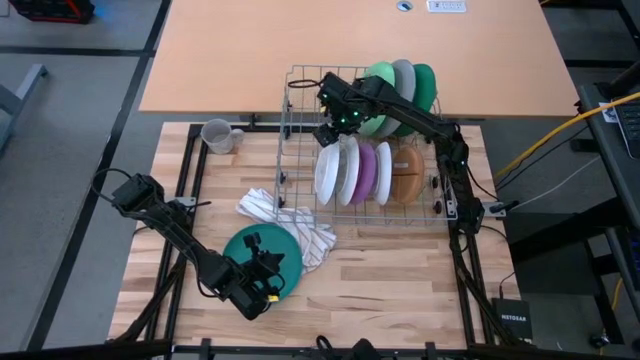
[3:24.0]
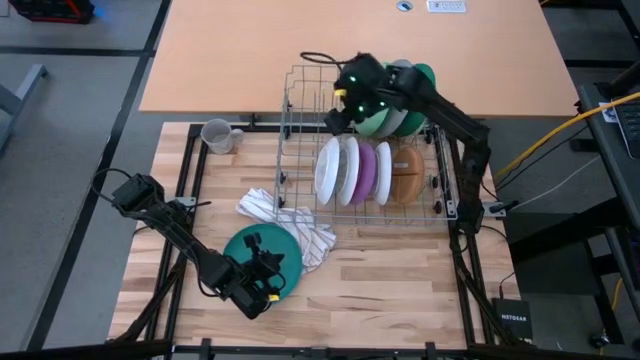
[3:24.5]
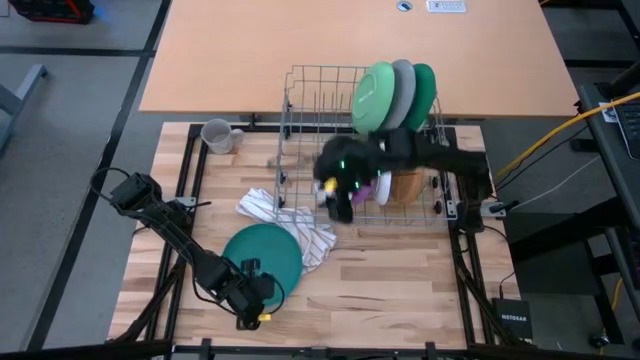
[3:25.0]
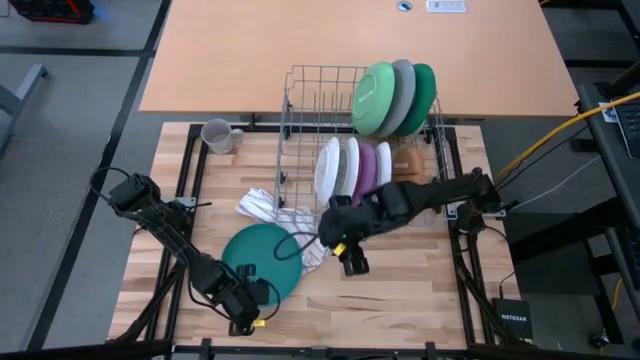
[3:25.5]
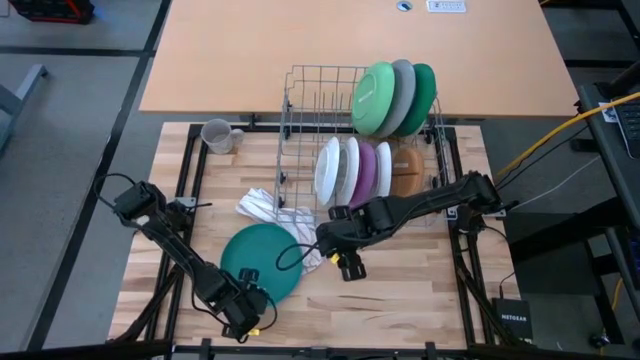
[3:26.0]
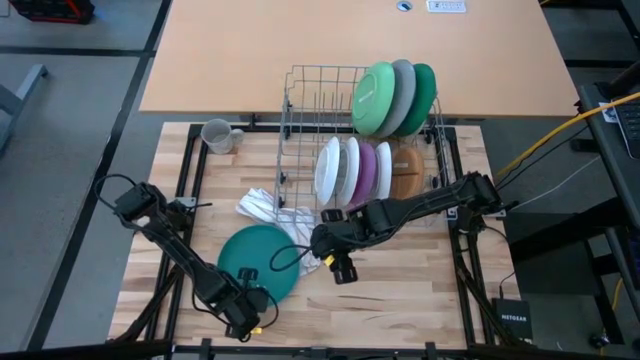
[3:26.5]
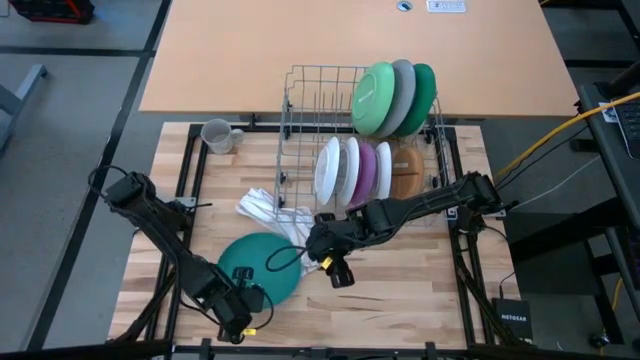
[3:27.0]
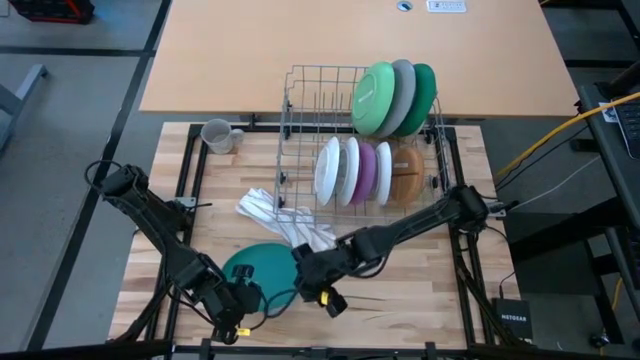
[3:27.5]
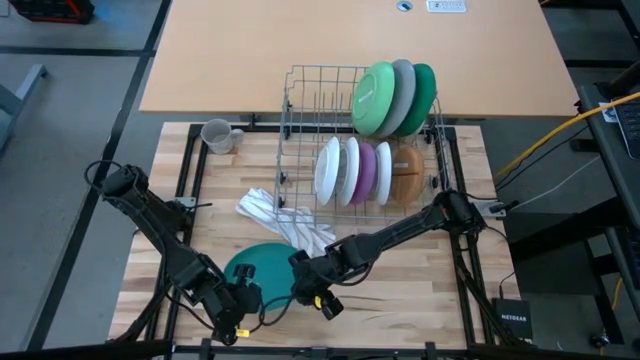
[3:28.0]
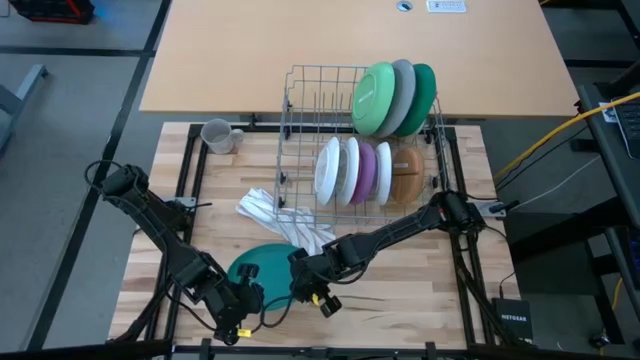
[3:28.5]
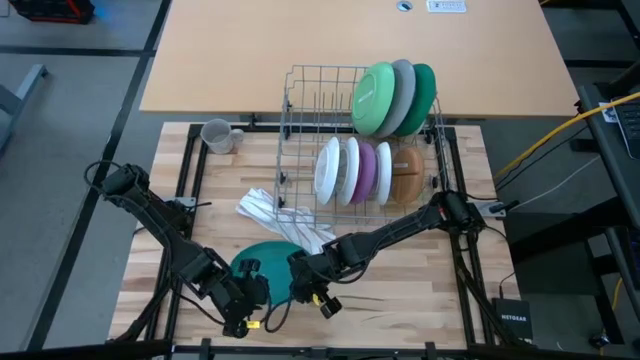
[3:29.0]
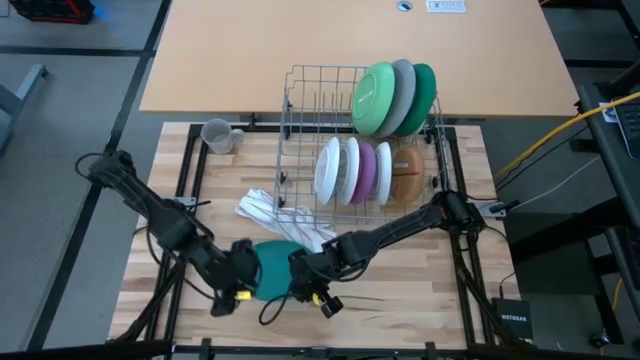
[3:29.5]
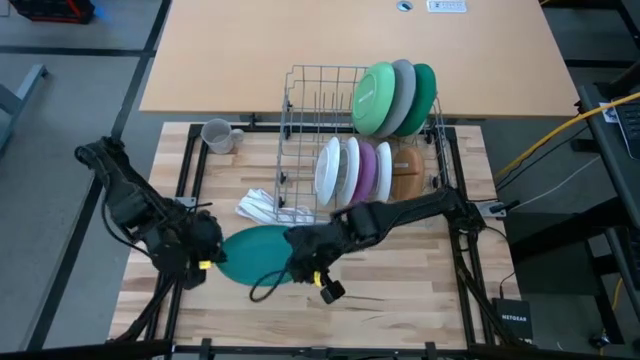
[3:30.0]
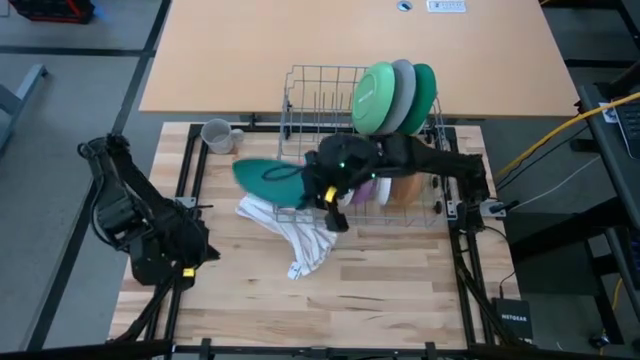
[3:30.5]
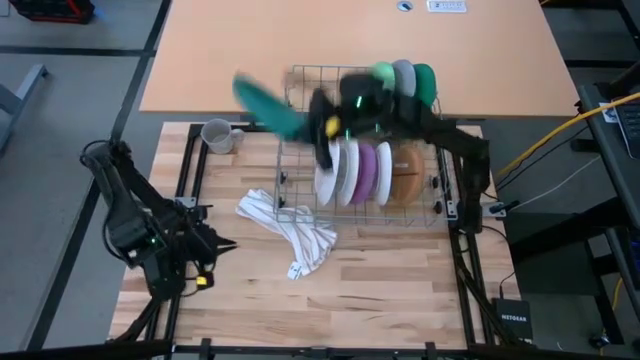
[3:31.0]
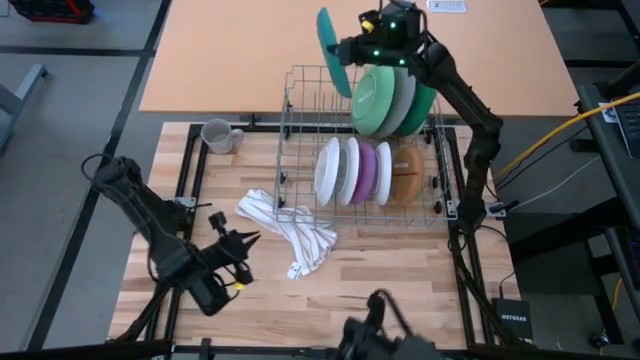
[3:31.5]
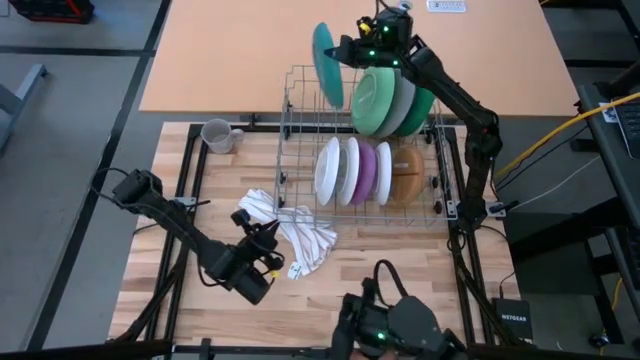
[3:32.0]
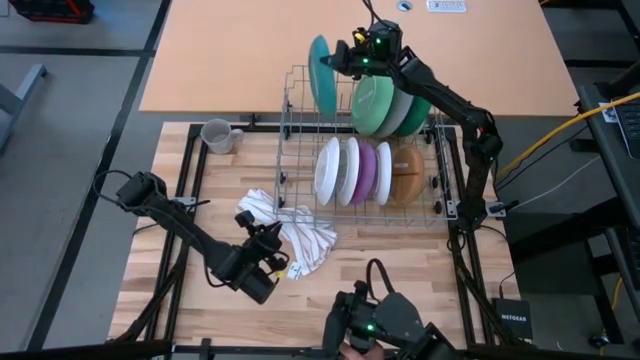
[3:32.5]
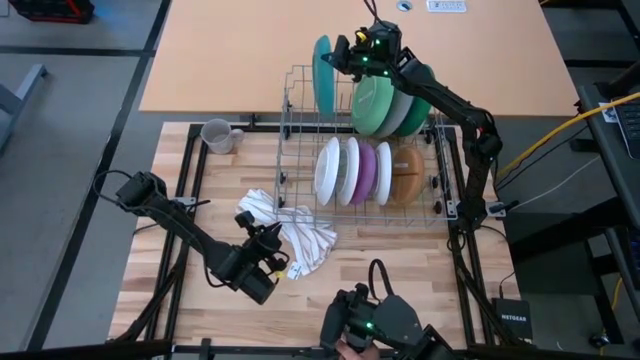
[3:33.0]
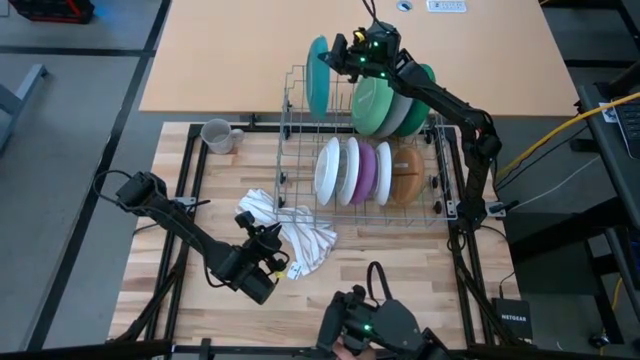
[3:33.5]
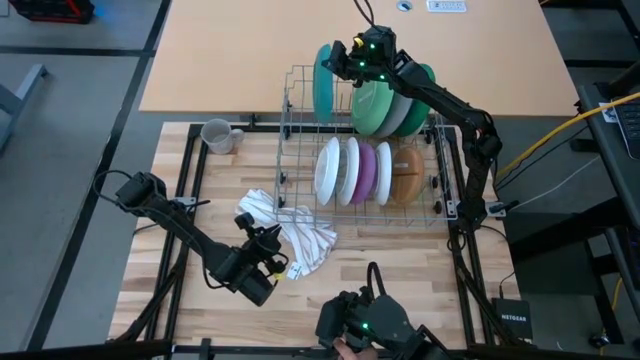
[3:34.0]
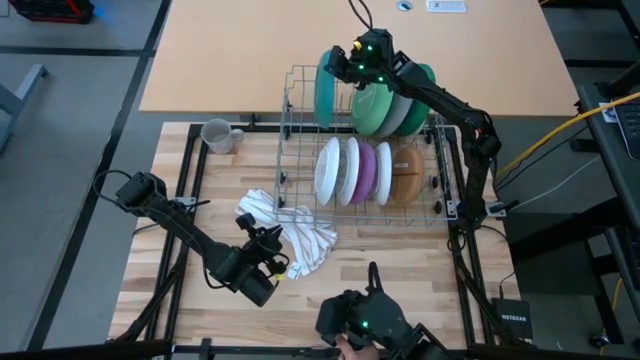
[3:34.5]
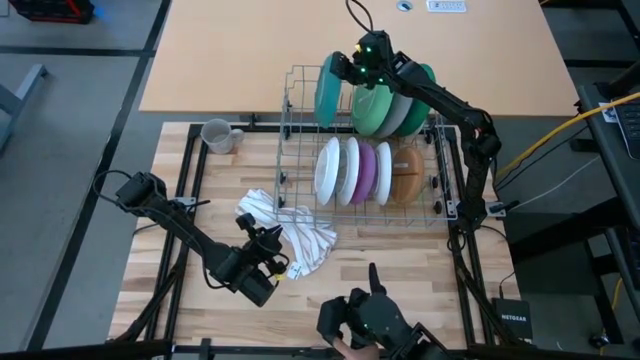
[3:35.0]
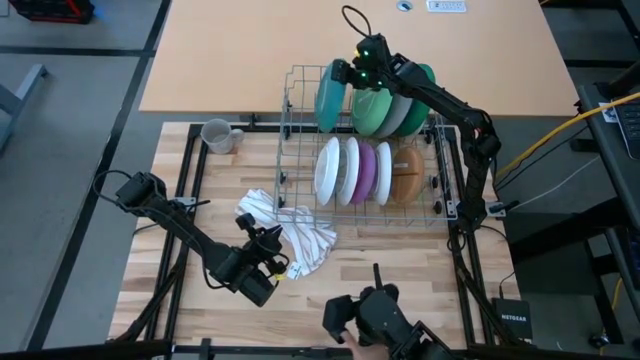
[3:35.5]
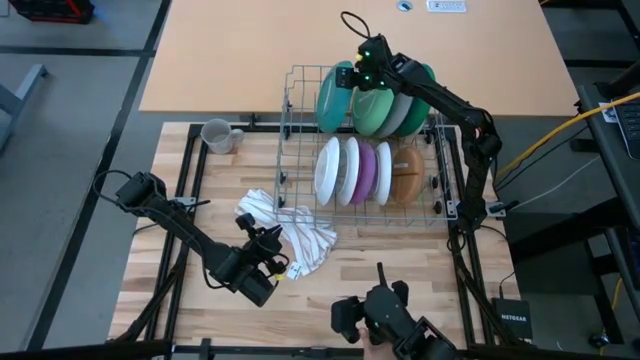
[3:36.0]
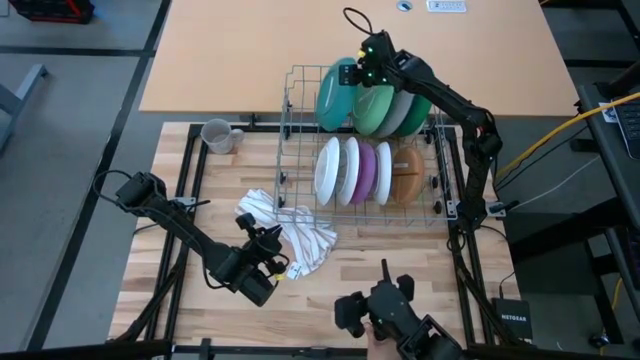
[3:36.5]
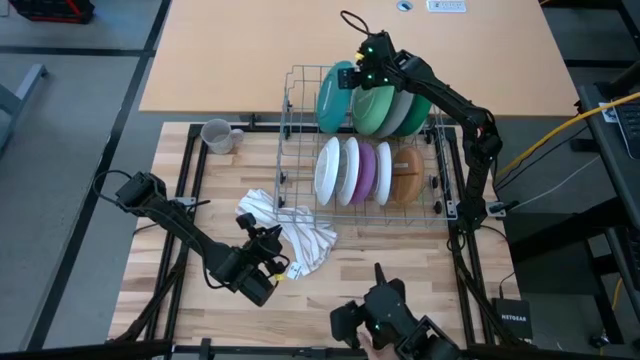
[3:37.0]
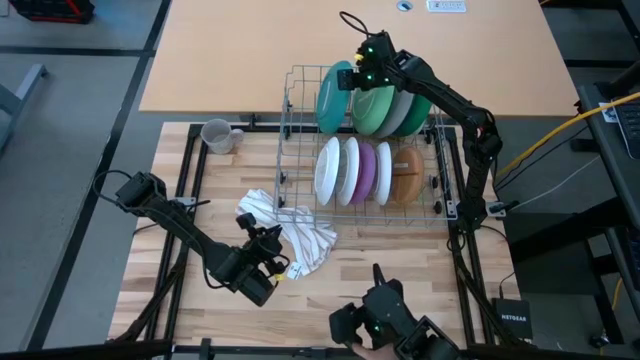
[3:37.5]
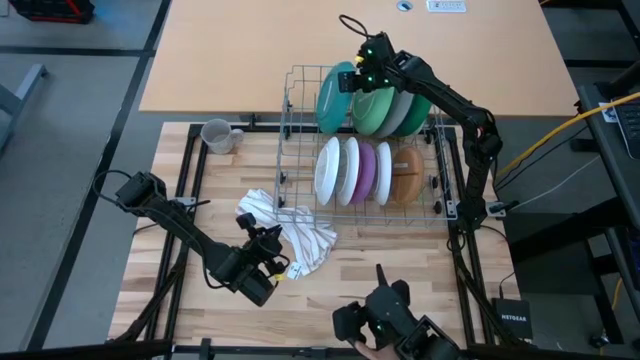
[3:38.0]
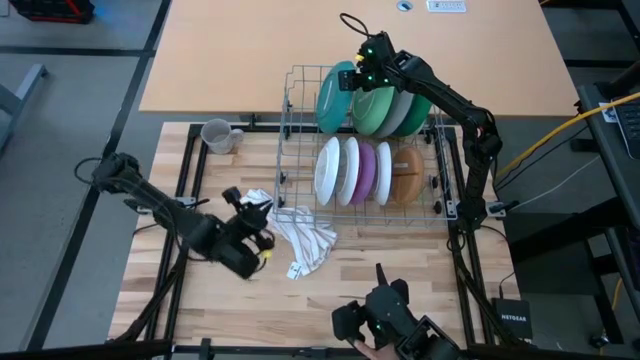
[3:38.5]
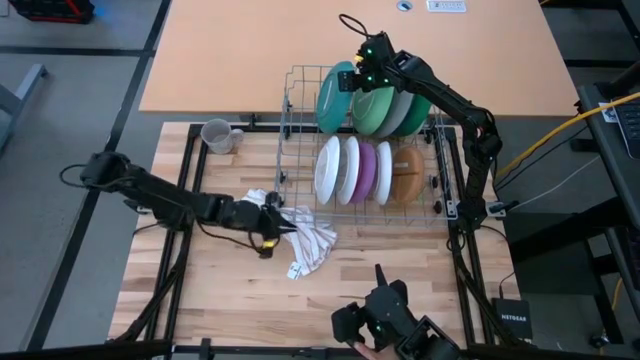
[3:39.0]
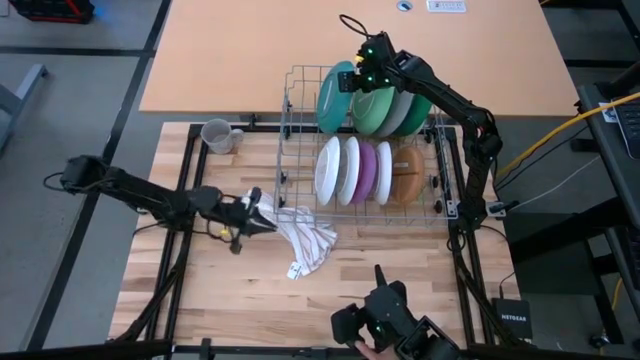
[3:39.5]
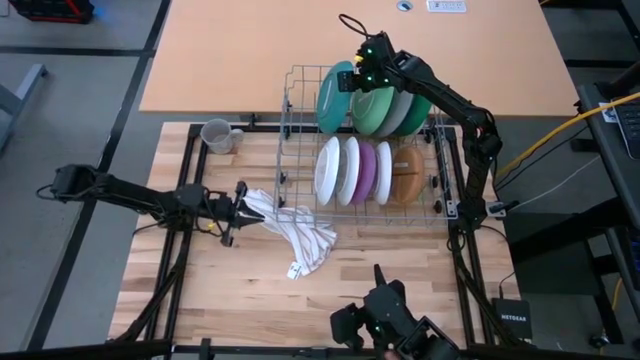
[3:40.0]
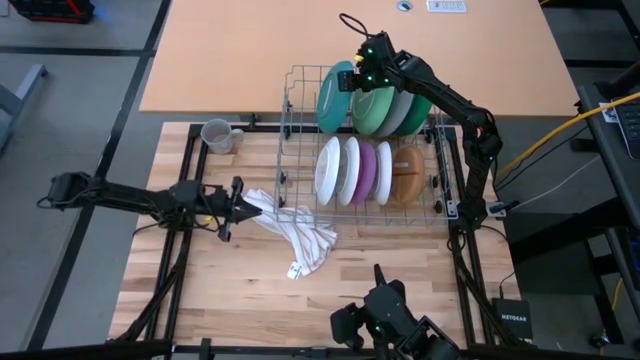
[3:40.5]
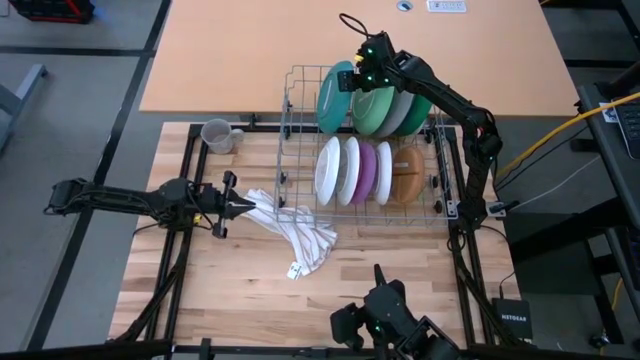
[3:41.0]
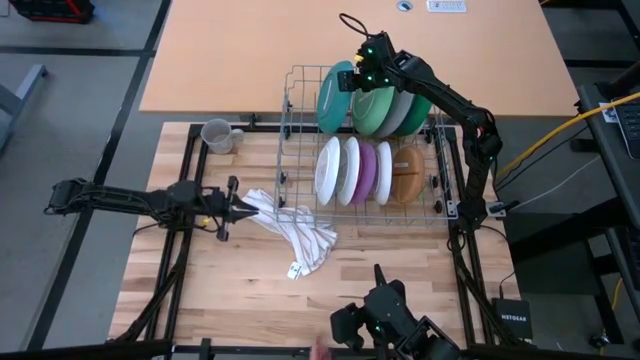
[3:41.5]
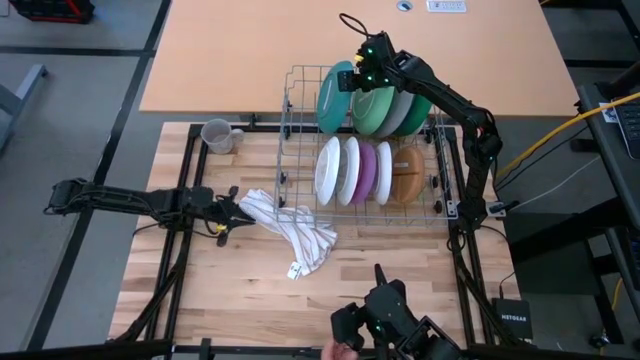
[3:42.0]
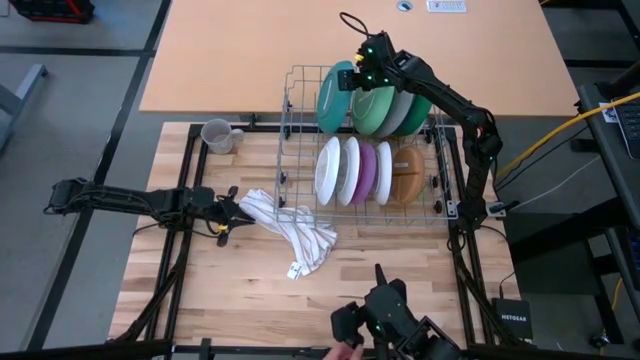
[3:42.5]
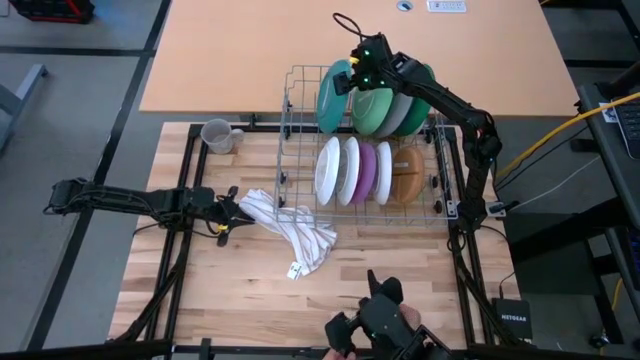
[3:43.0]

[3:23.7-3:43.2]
Task: Sort dishes
Put the dark green plate into the dish rack

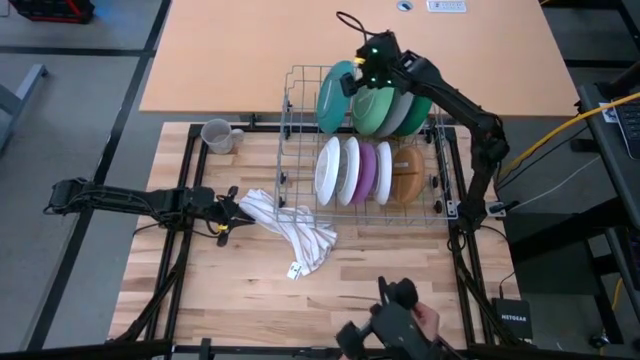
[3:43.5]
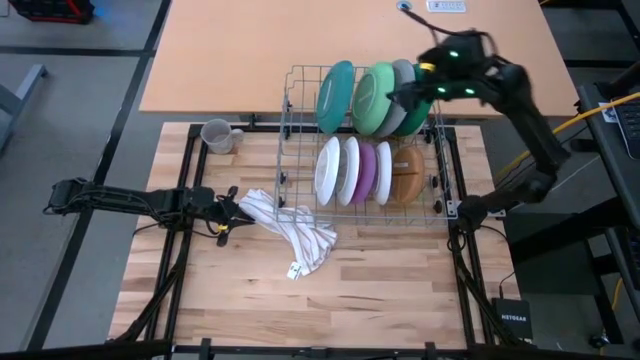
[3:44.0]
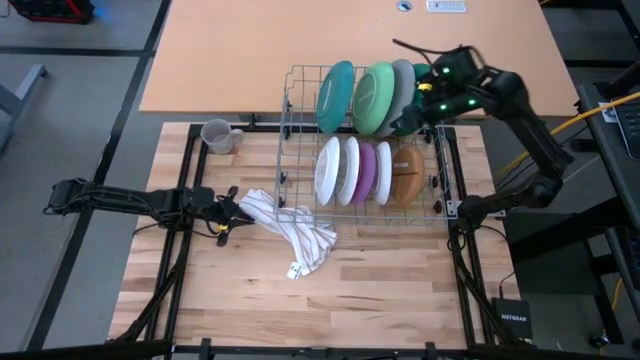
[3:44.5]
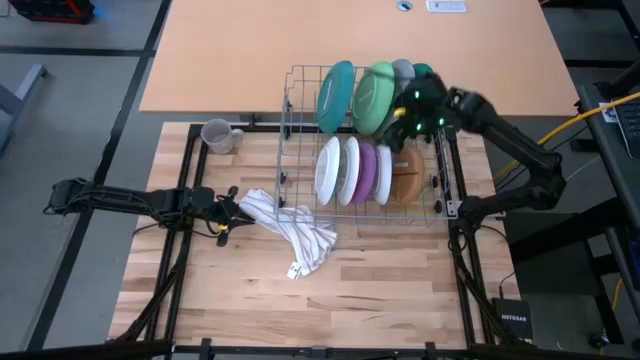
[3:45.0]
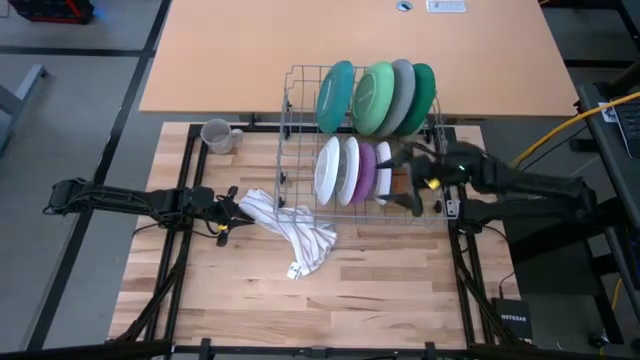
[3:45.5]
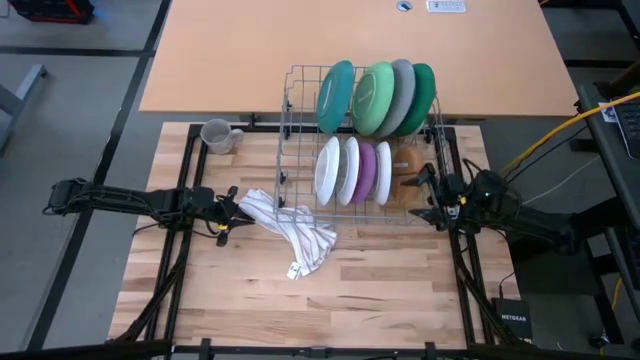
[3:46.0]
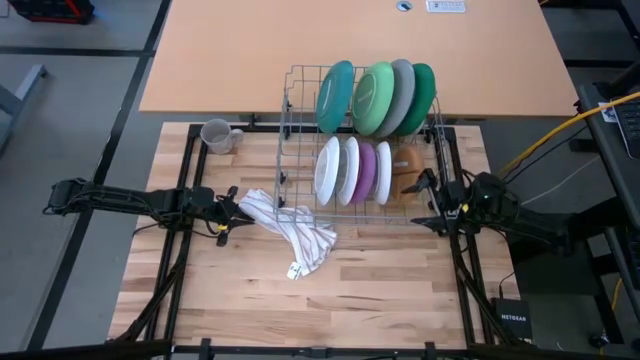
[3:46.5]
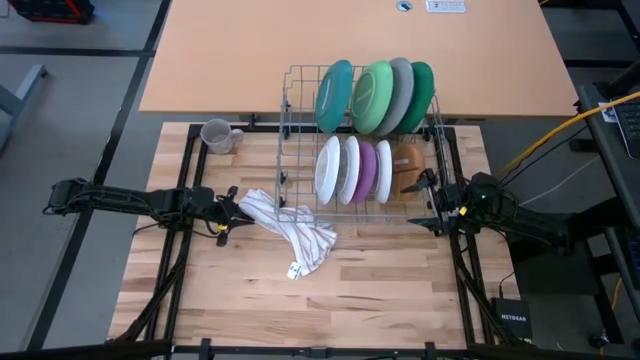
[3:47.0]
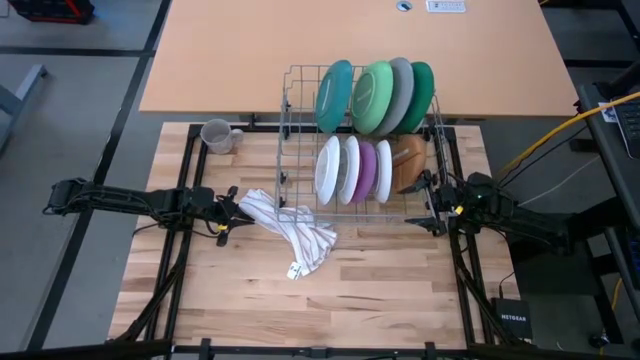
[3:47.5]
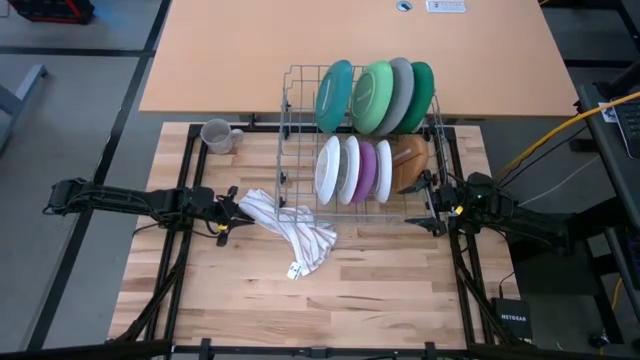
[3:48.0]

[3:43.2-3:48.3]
Return to Home Position
